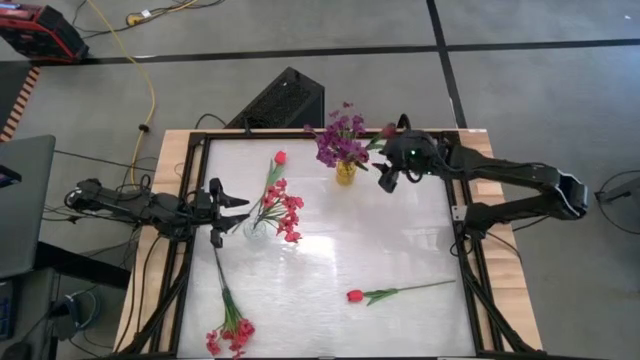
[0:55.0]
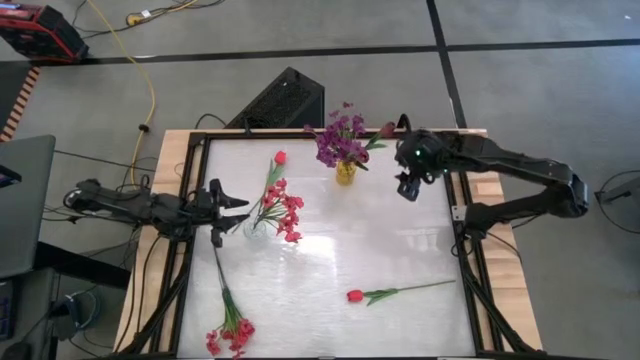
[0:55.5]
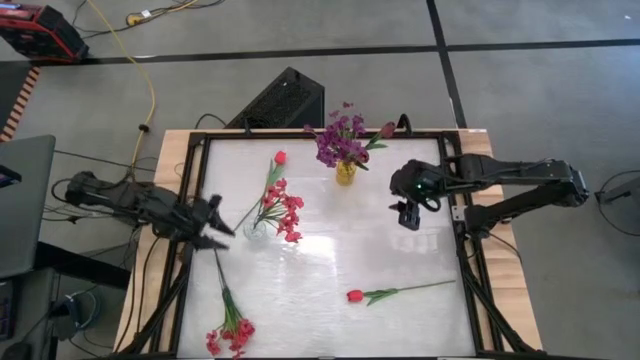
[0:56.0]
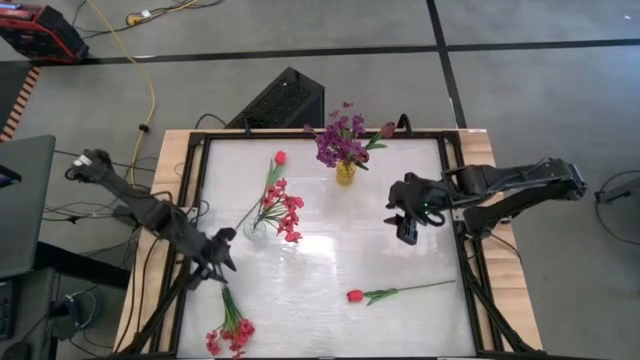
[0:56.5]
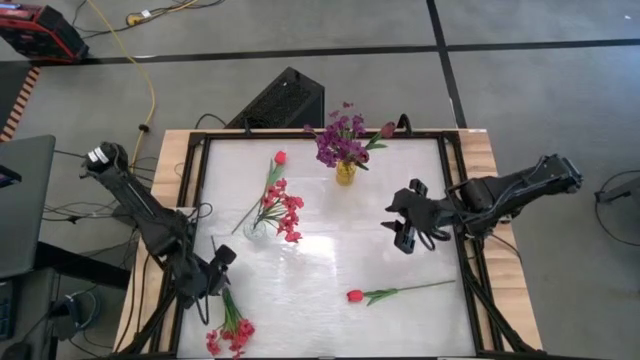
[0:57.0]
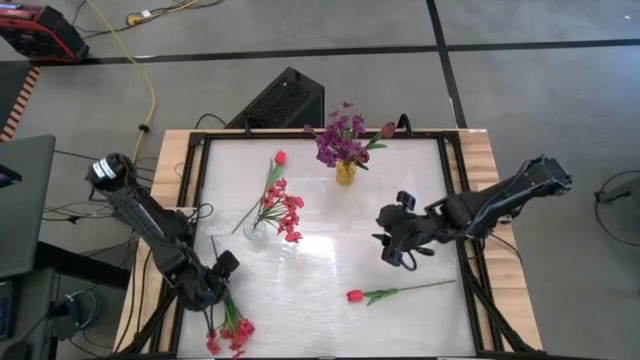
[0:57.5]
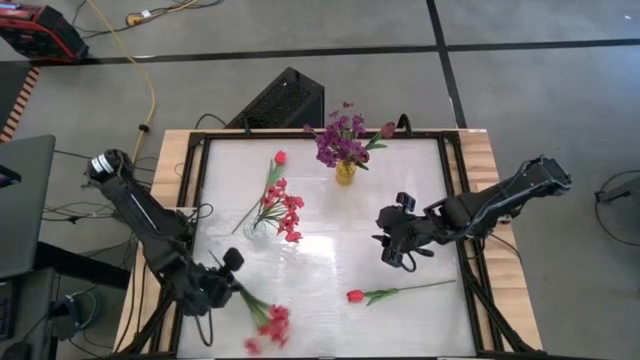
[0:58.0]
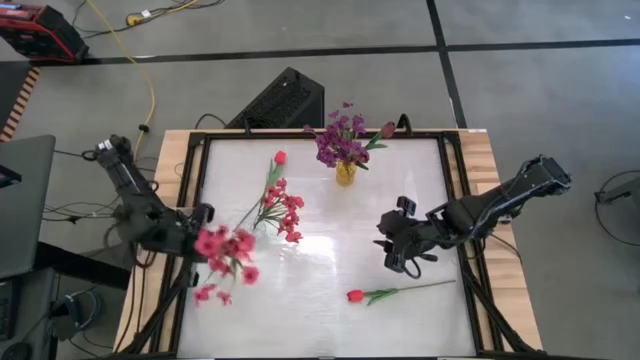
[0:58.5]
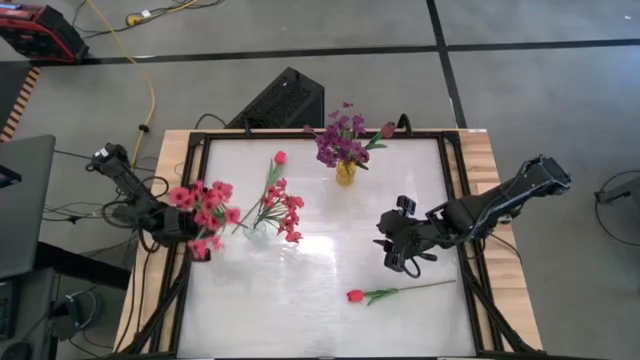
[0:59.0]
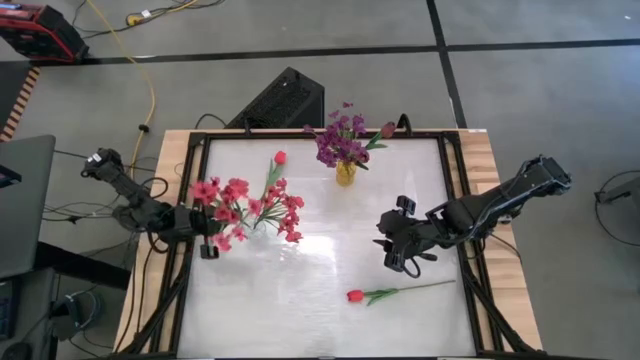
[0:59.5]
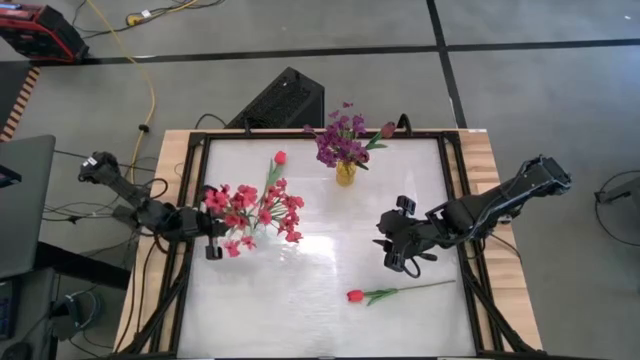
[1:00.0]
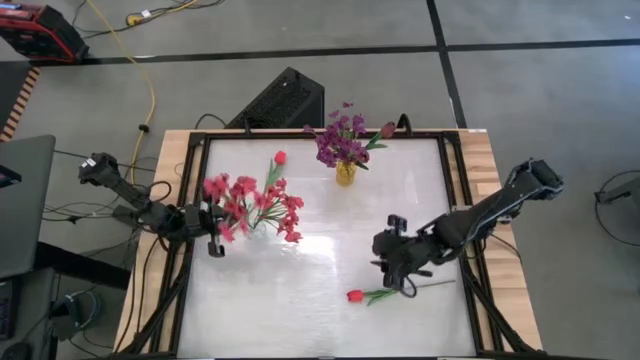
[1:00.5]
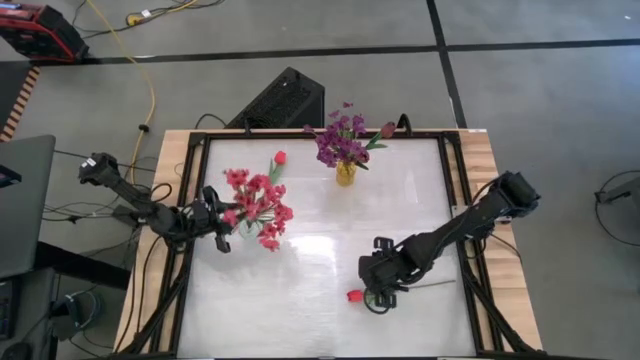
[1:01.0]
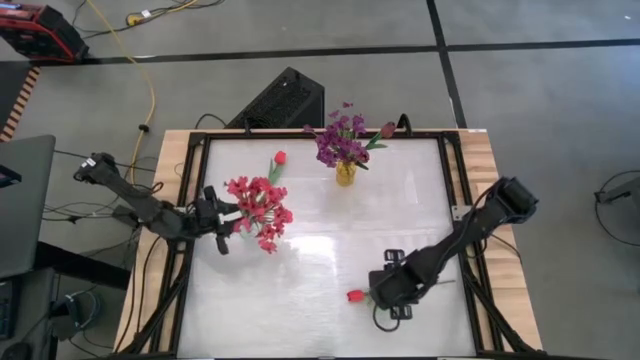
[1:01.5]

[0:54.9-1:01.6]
Task: Sort flowers into vase by color
Put the pink flowers into the transparent vase

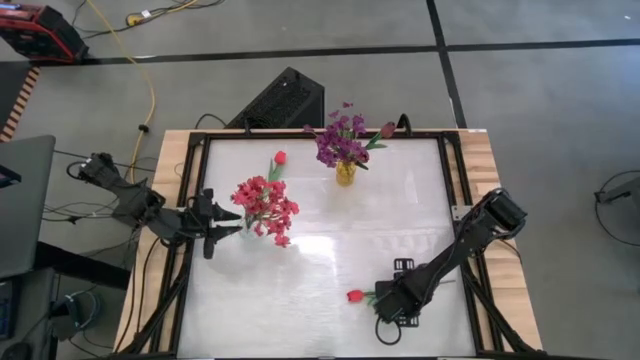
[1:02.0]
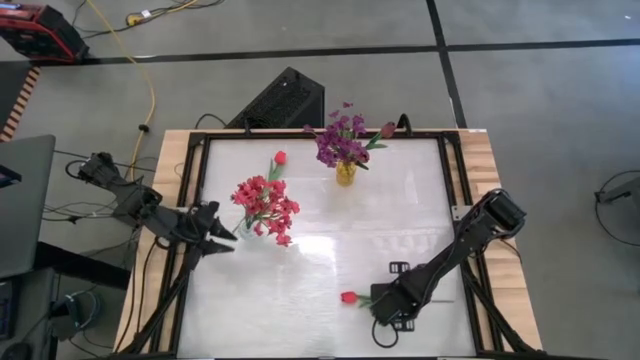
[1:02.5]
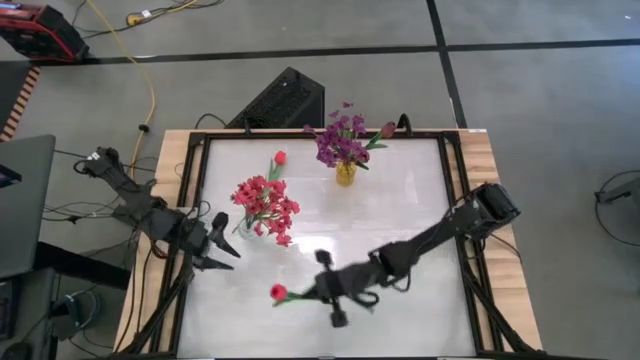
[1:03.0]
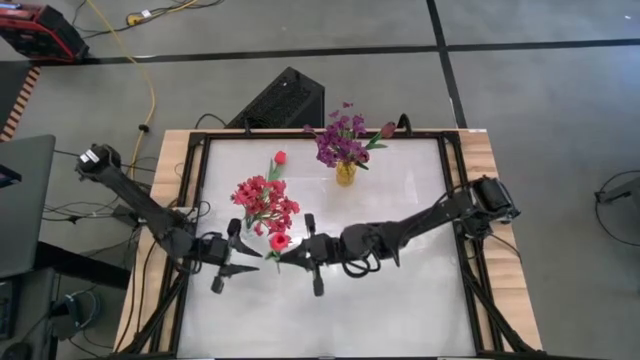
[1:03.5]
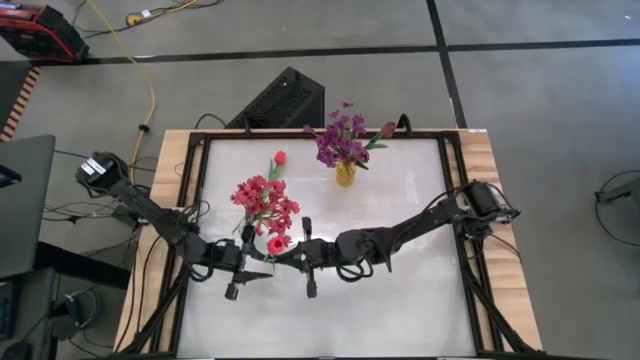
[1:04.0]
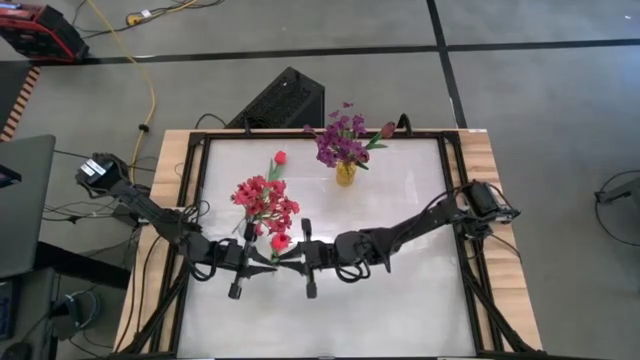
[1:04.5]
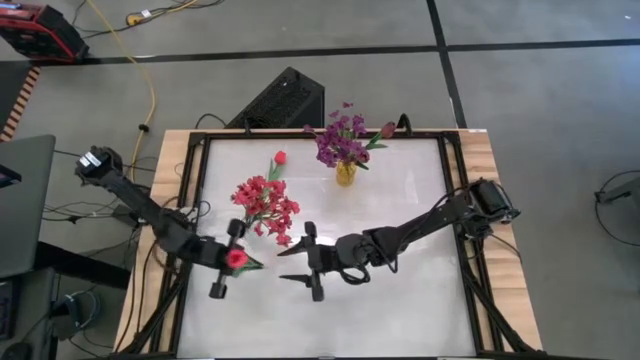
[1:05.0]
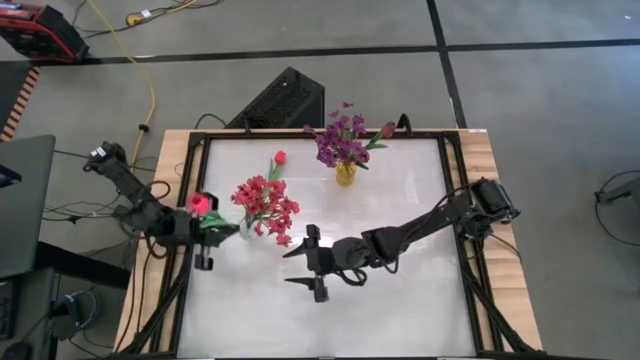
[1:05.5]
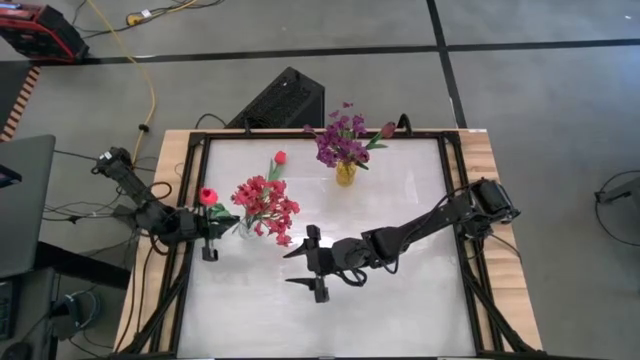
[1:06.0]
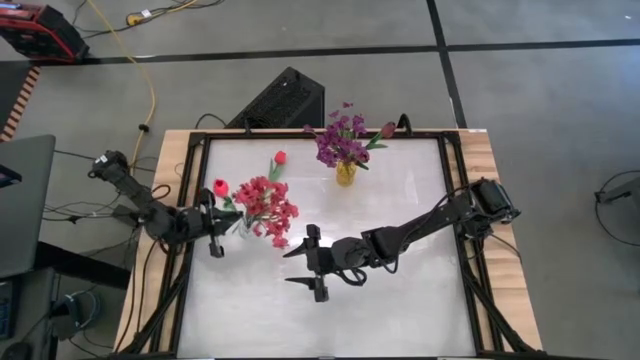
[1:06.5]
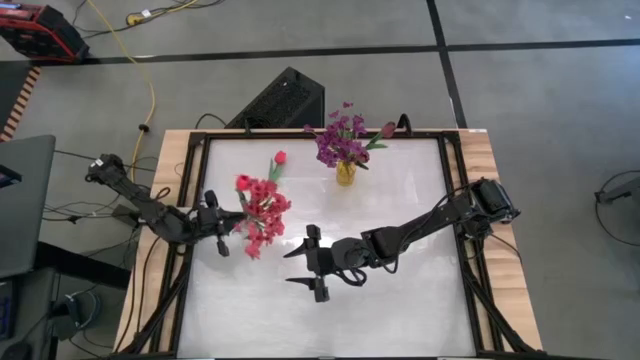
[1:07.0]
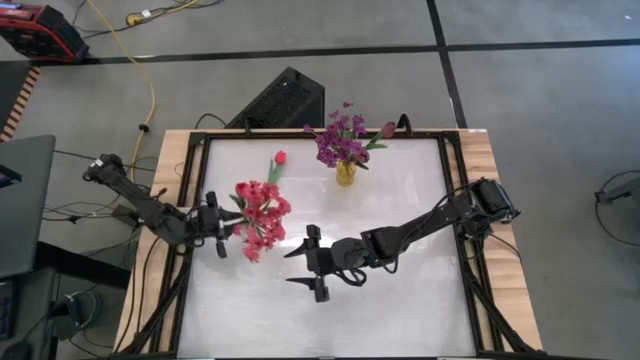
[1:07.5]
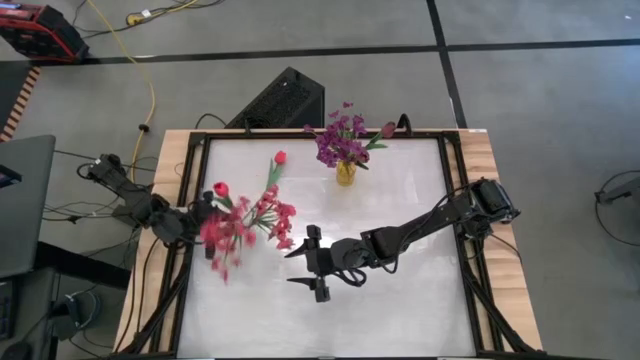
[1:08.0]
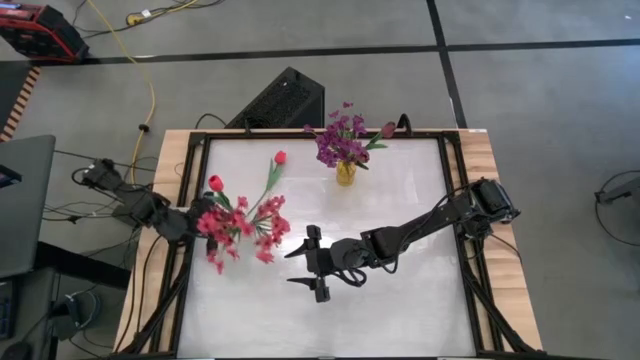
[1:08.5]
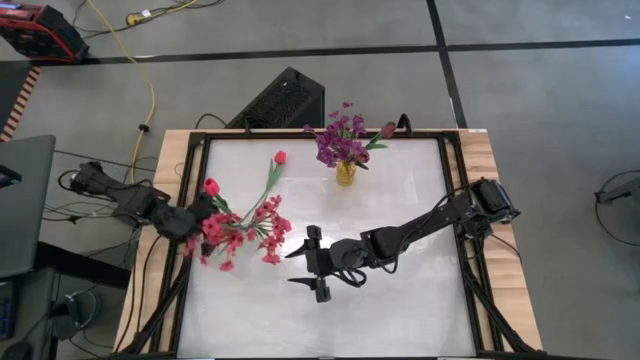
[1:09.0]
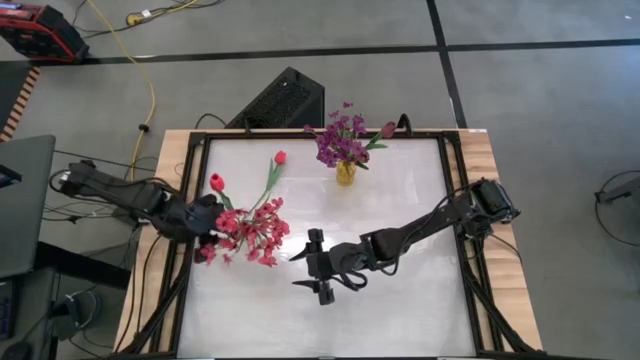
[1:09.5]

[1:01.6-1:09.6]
Put the bottom pink tulip into the transparent vase

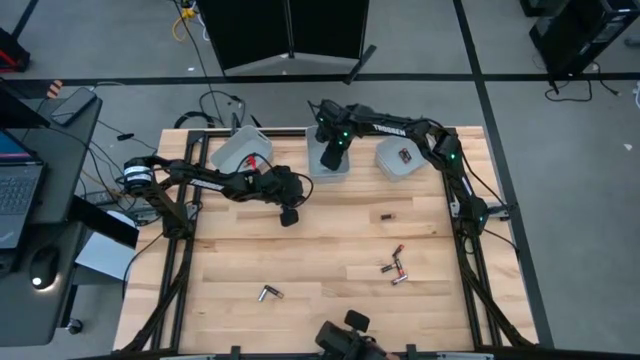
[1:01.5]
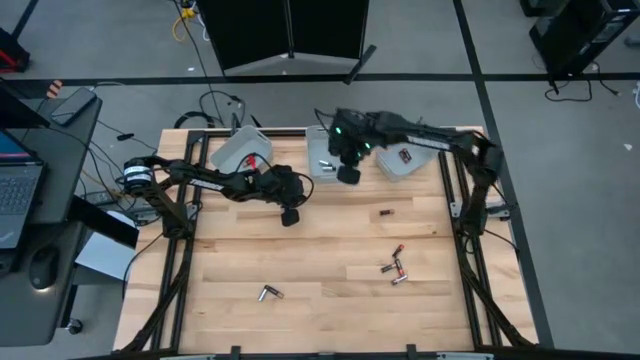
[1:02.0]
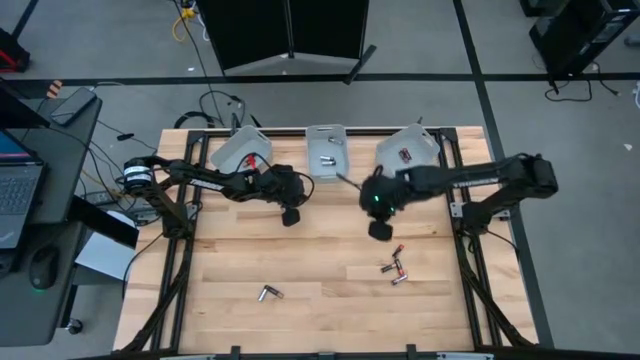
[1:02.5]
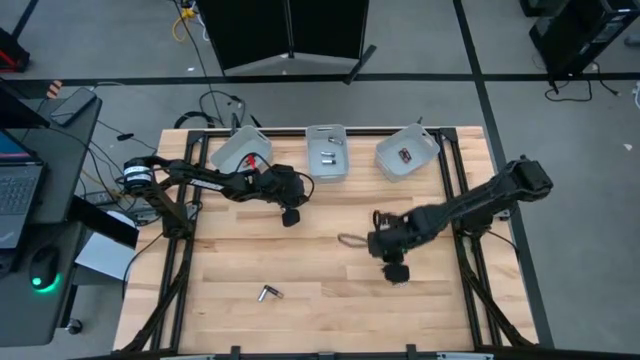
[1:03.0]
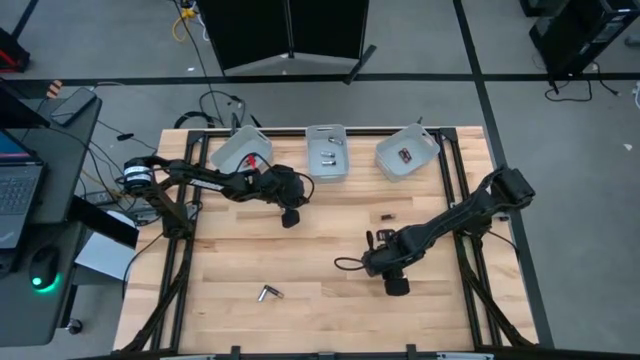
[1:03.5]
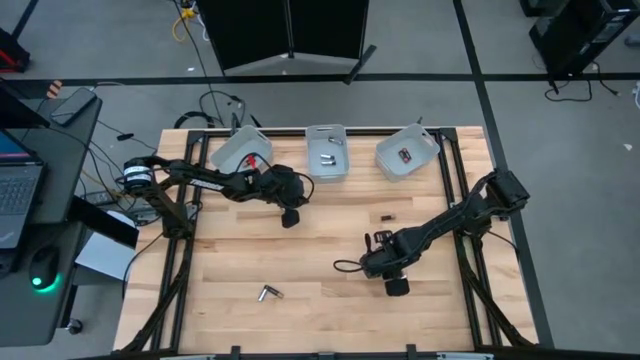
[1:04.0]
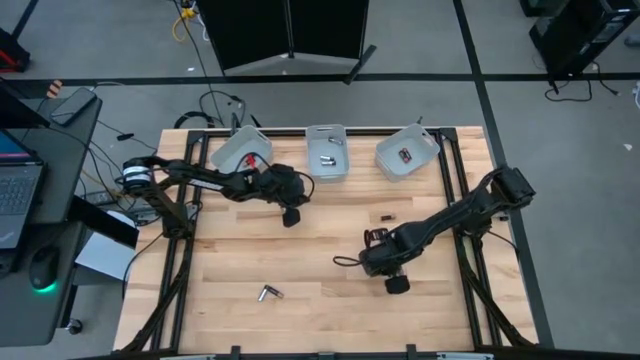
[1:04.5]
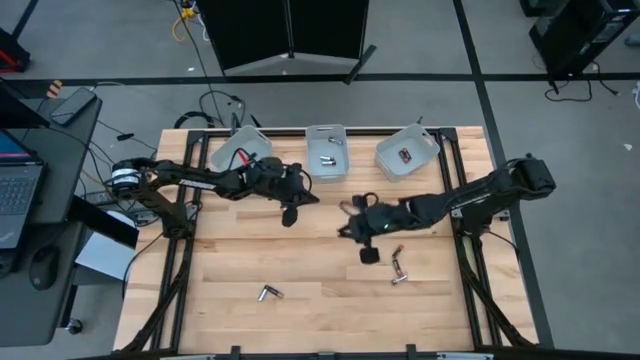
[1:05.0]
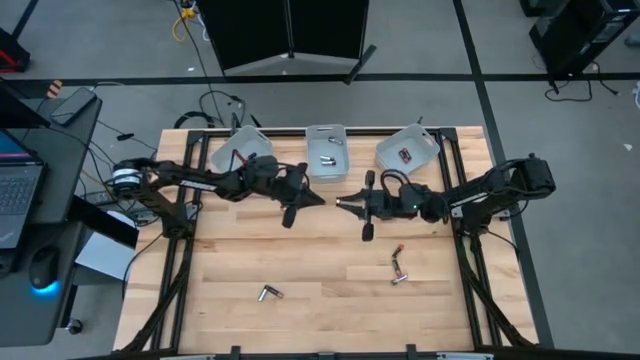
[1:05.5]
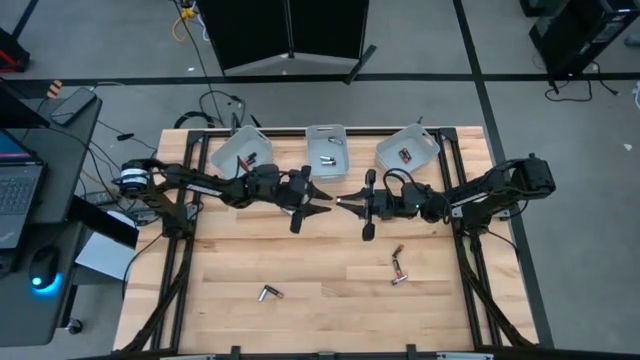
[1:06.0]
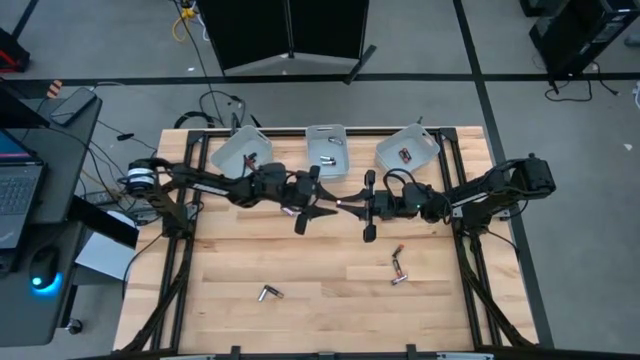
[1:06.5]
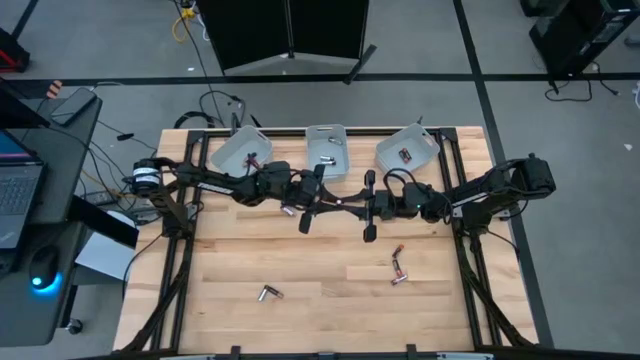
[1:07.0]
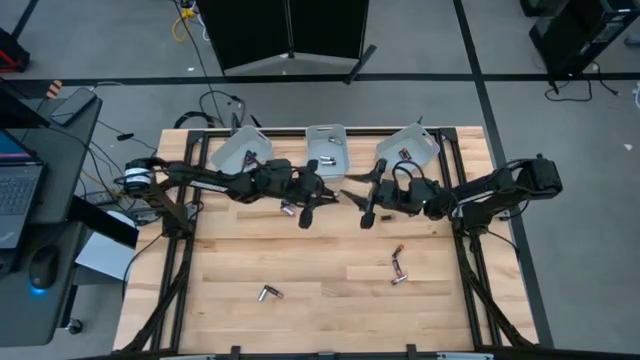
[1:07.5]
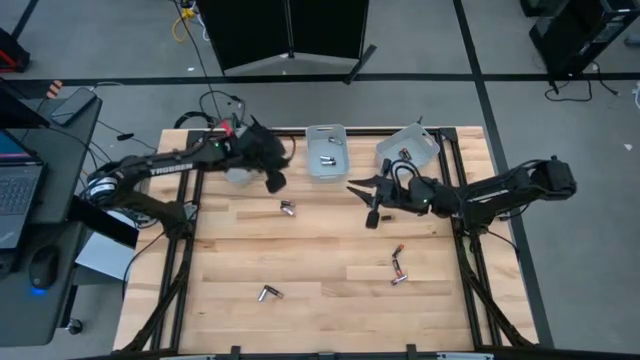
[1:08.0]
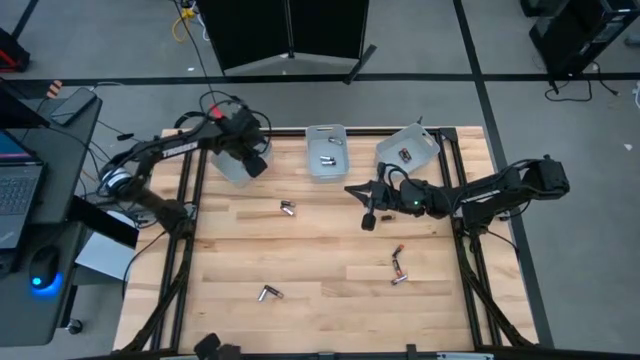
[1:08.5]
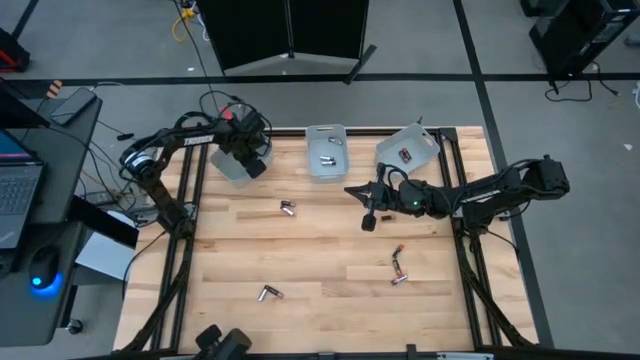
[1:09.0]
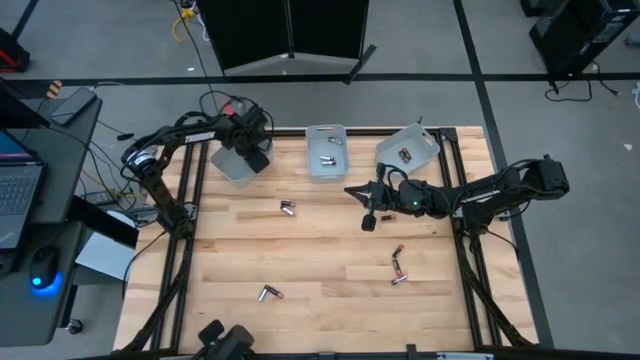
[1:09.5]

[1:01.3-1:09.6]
Task: Sort batteries
Put the gold battery into the left gray bin
